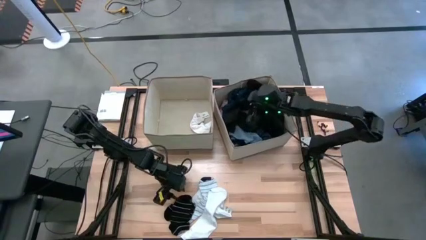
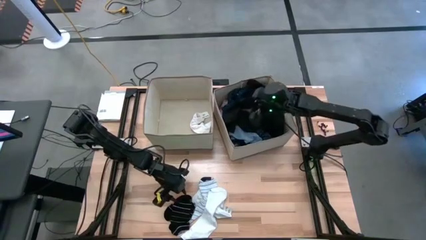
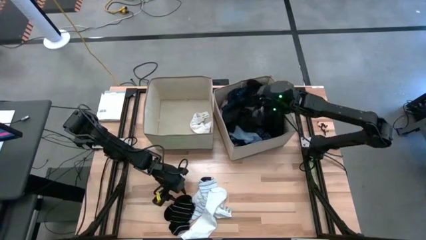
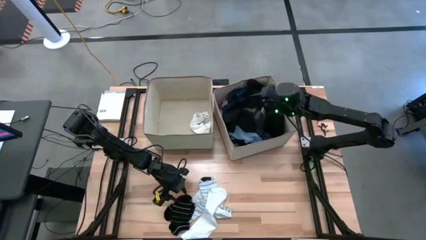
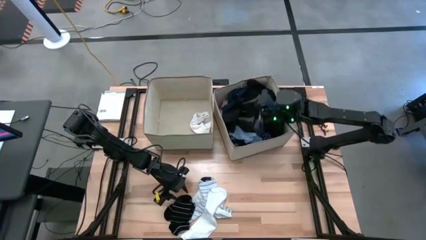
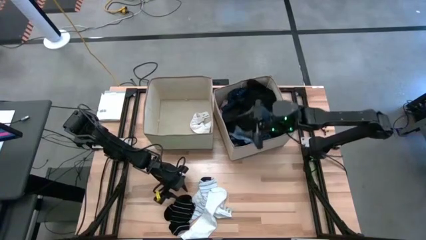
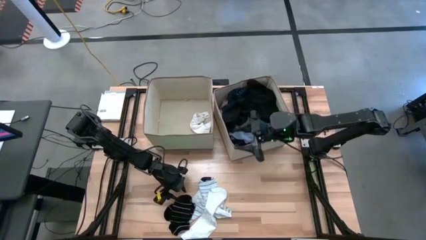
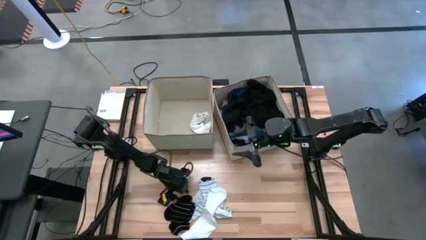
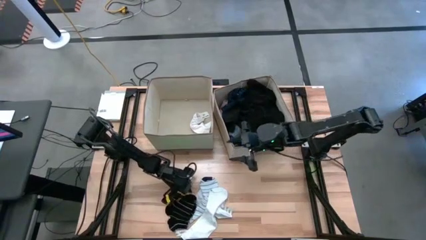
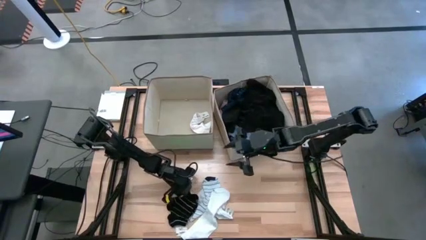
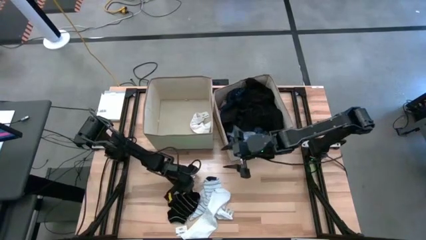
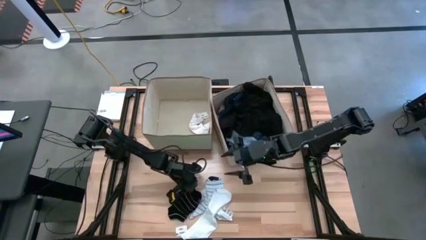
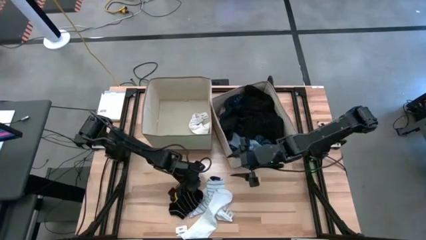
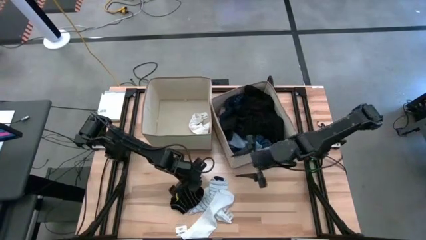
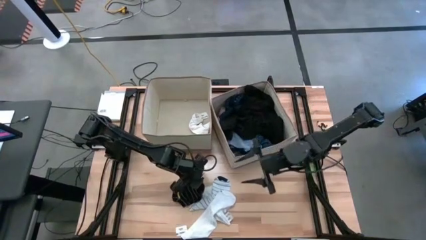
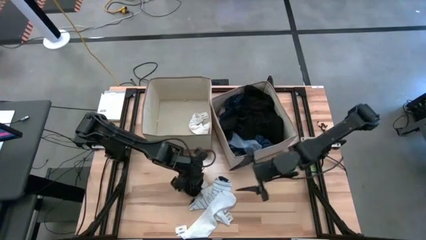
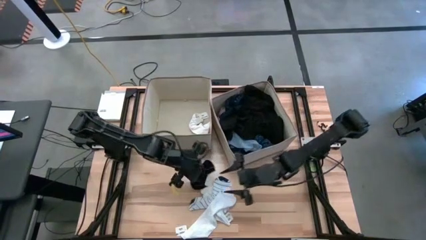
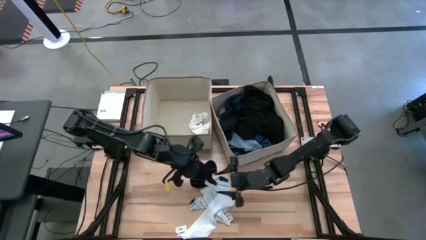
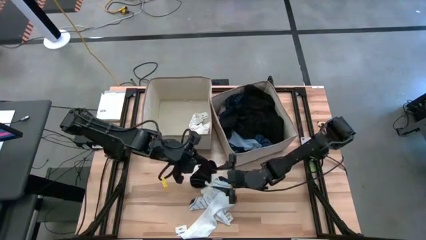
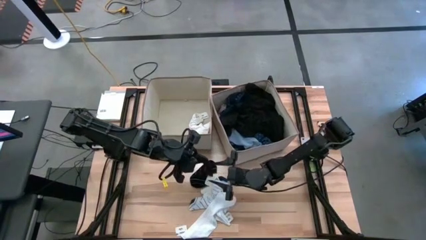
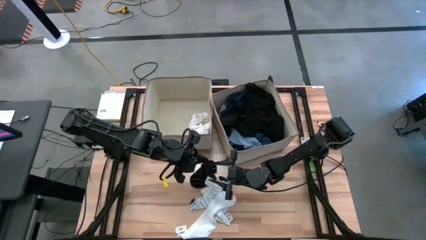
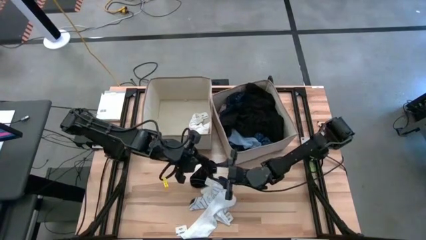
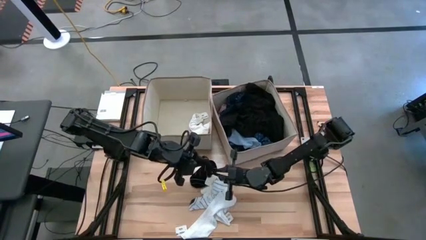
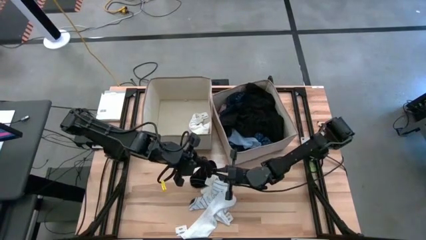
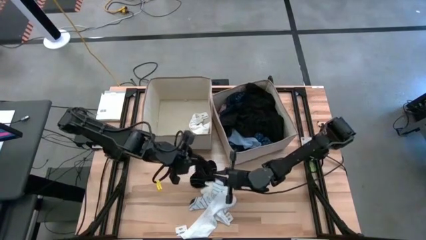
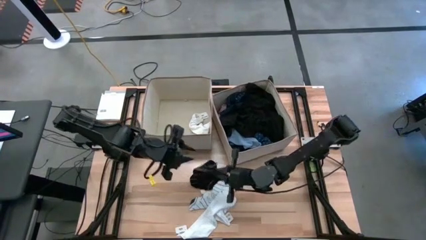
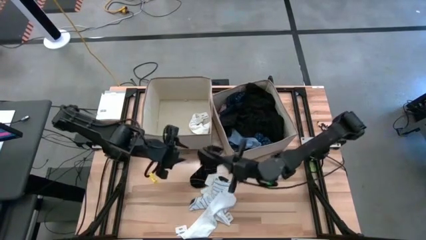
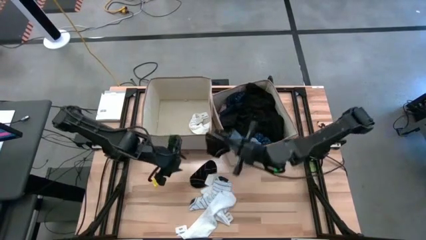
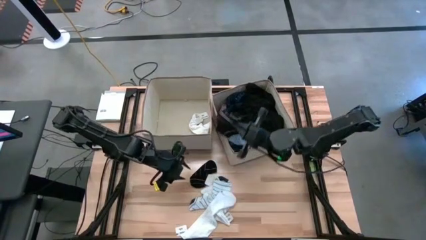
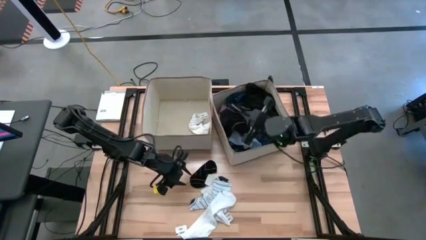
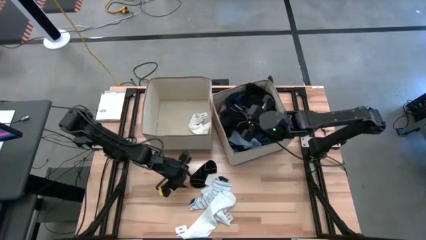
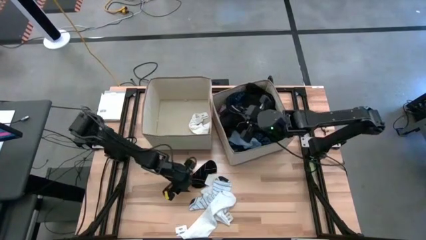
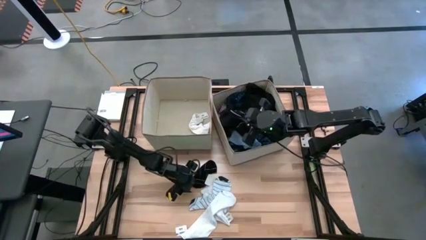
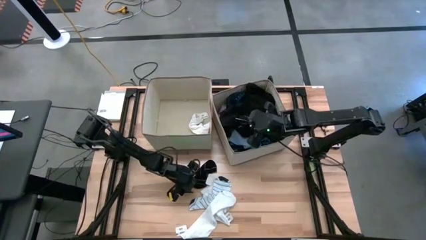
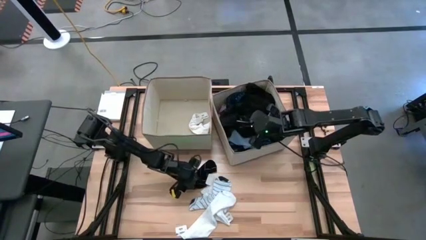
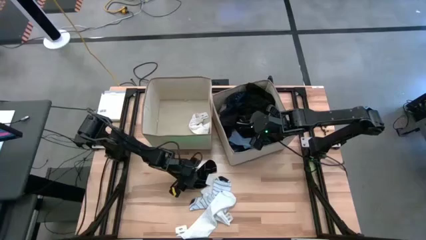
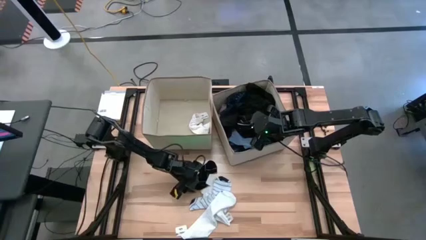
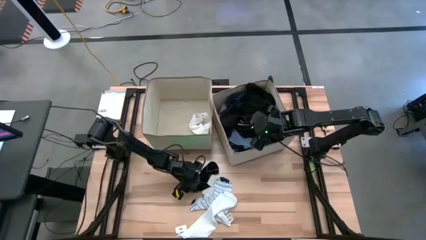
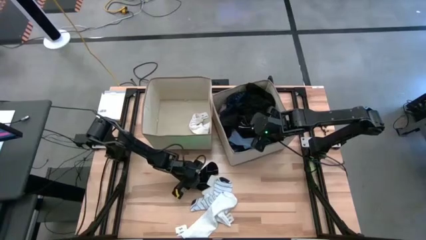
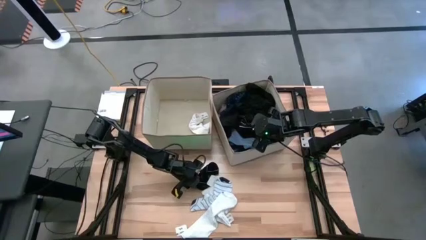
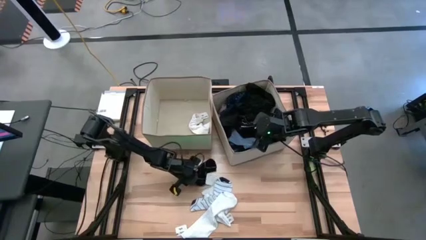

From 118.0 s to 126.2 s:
Task: Sort clothes
Put the top black sock into the right laundry organizer

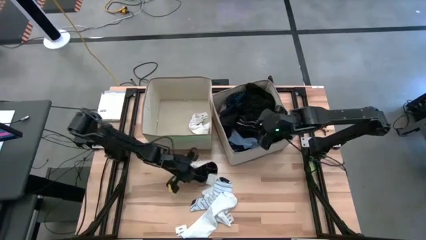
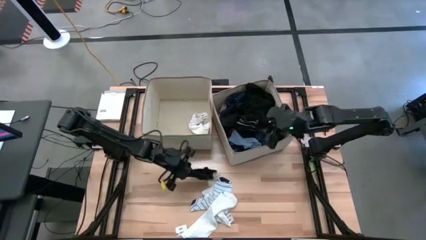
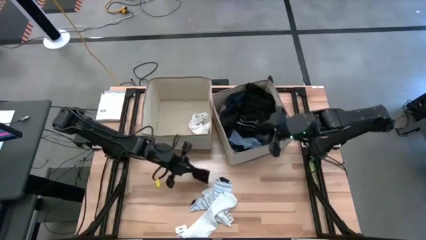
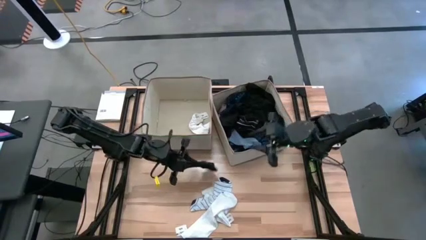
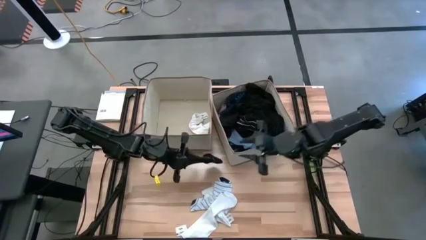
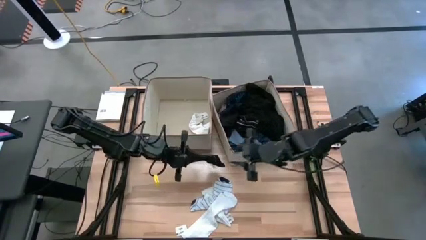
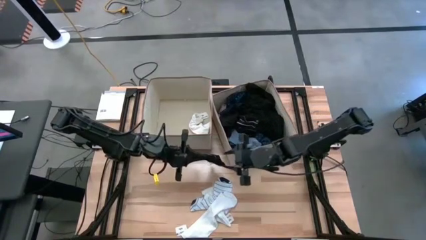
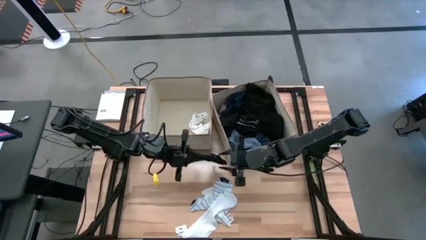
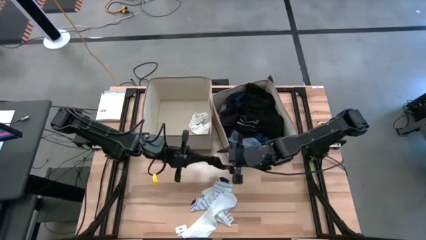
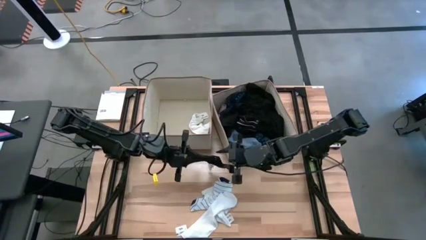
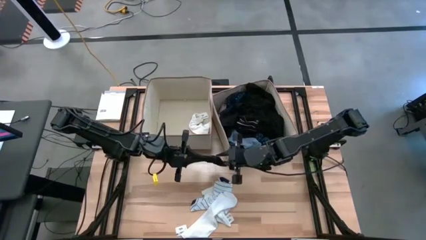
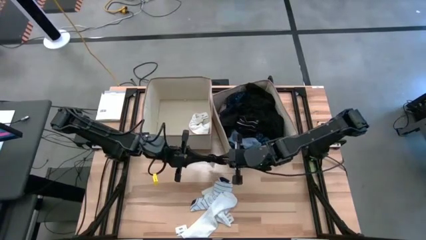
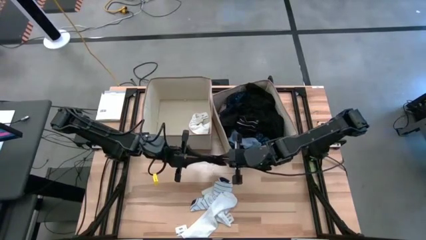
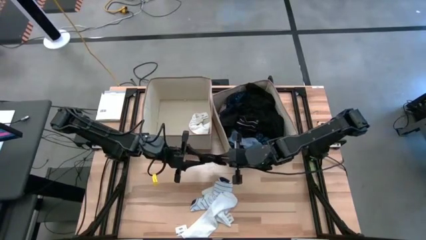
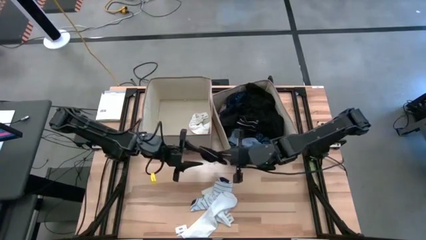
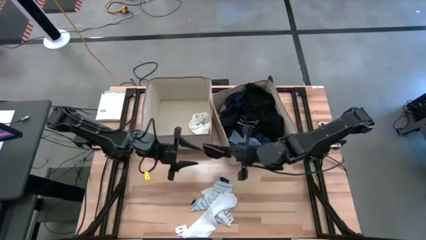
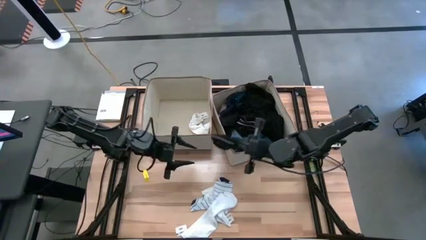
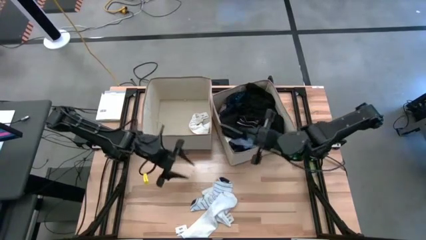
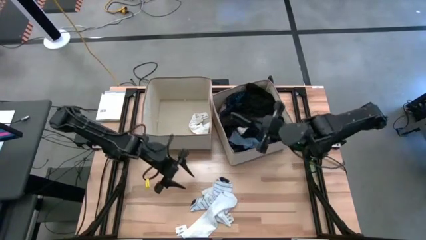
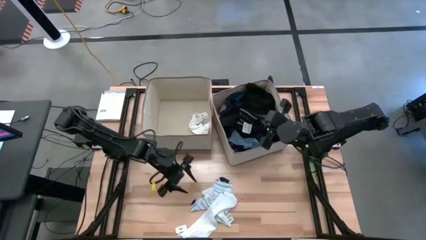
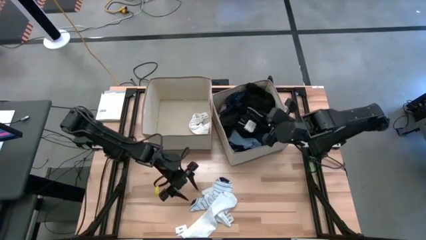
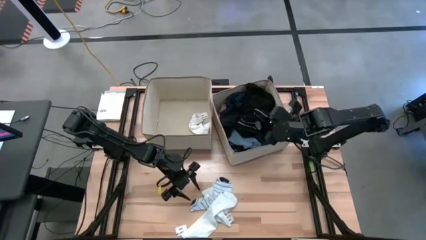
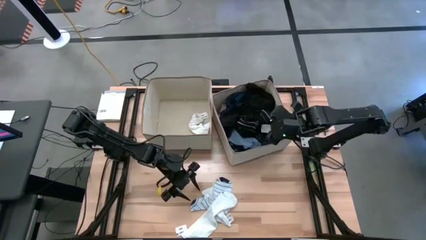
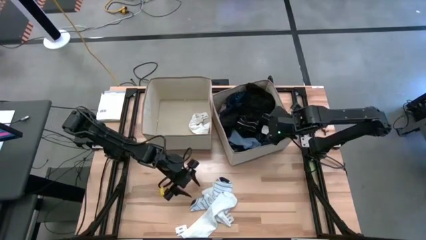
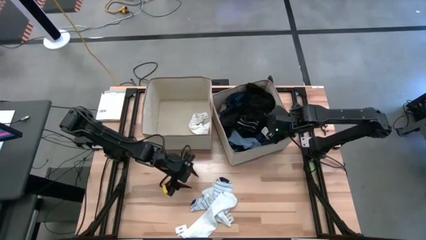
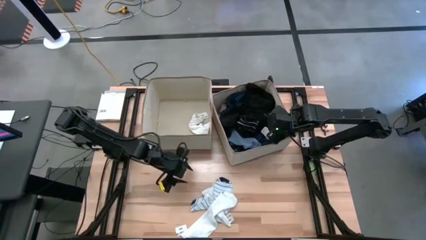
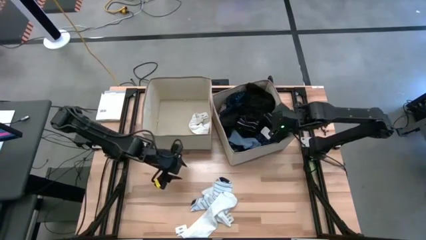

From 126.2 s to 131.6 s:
Put the black sock into the right laundry organizer

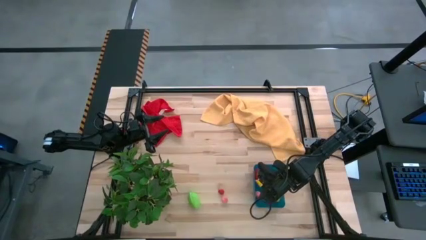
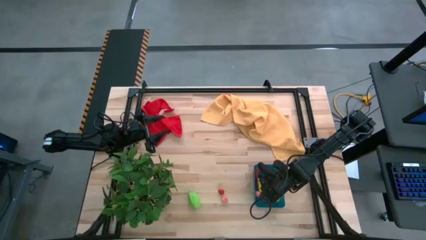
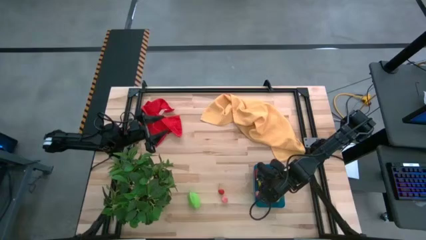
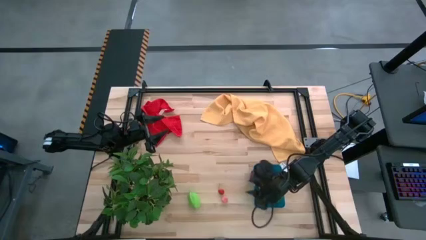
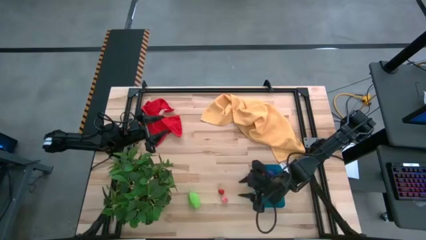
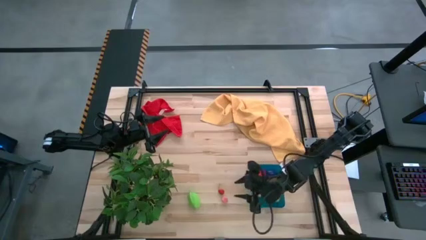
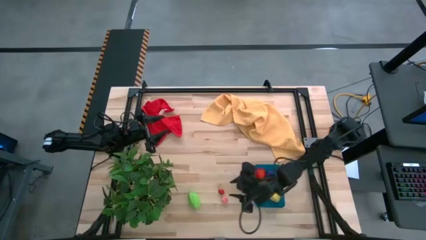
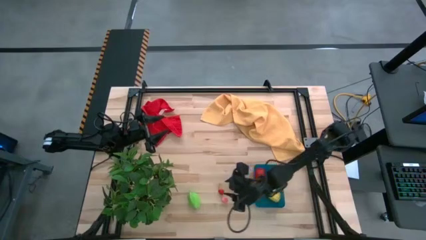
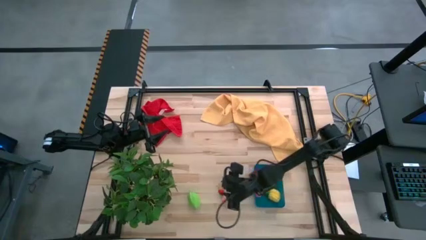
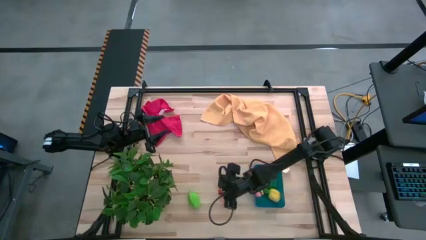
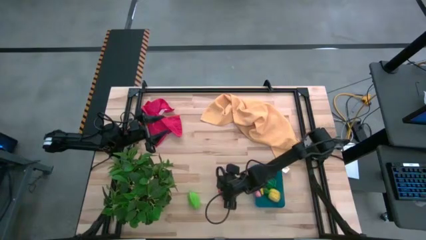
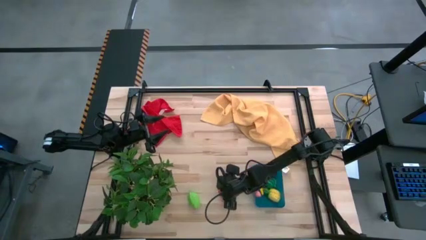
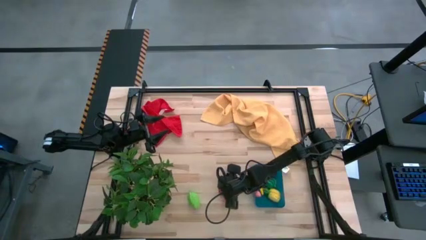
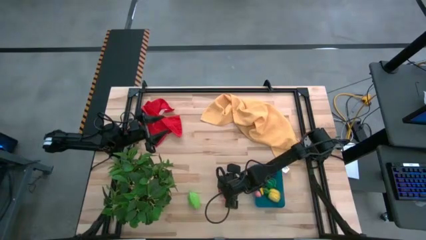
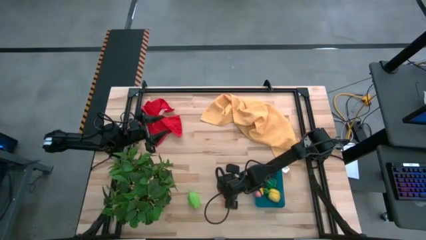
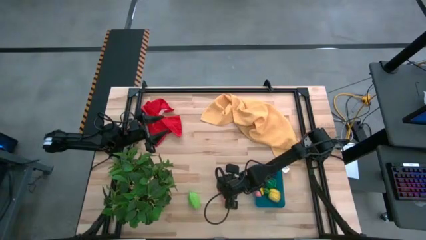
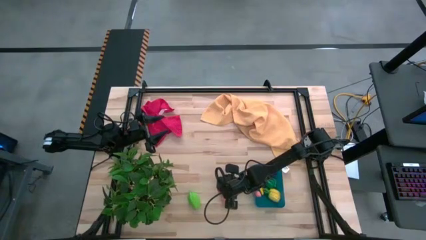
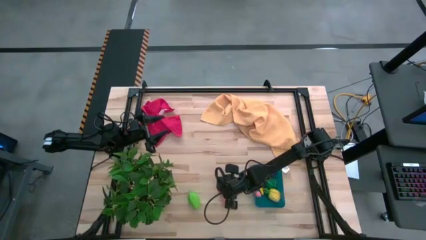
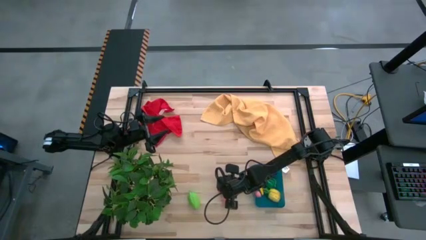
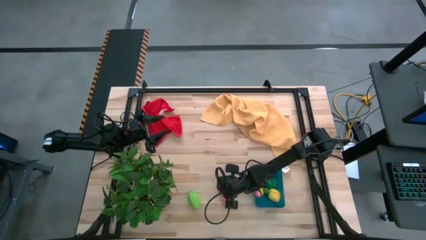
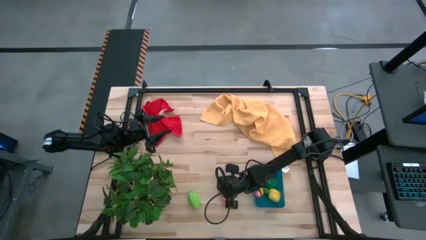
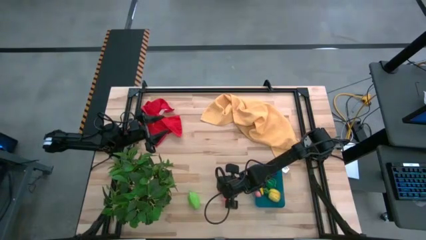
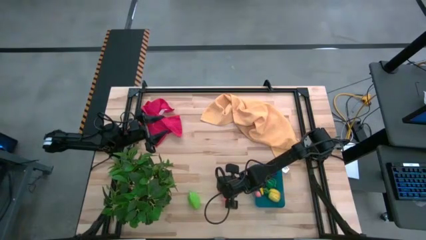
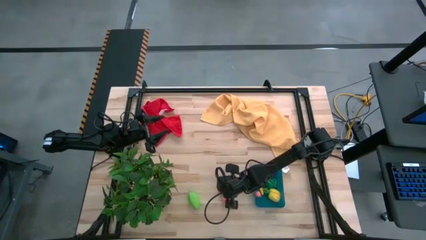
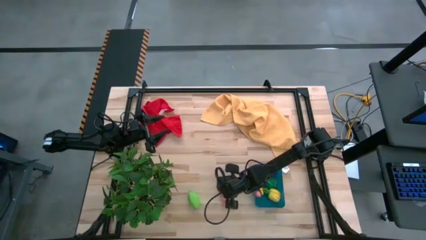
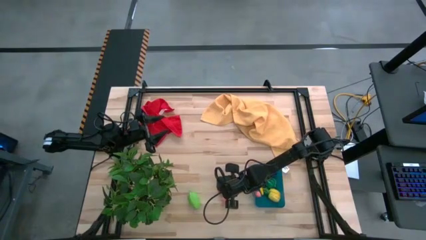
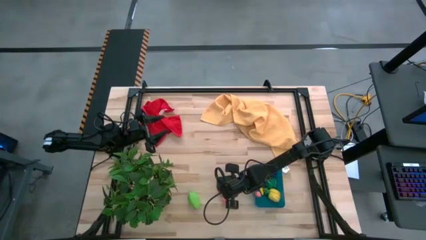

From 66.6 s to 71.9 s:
Task: Pick and placing Produce into tupperware
Put the red raspberry into the blue bin
